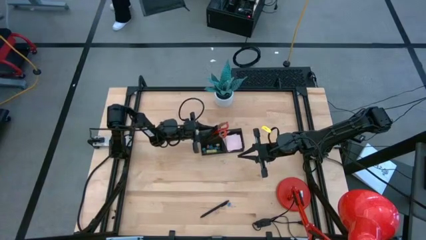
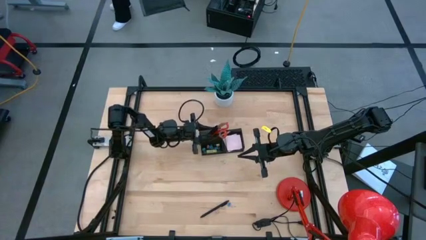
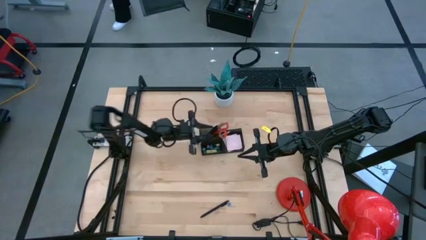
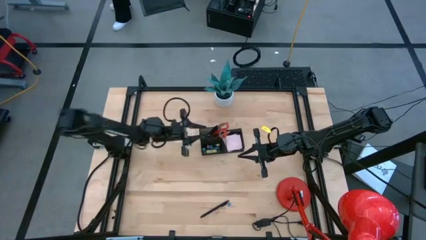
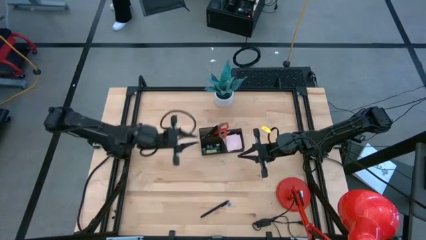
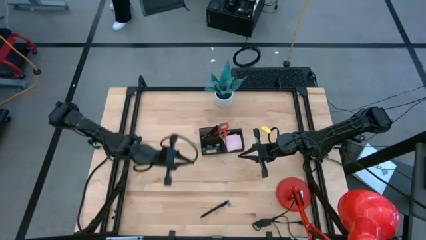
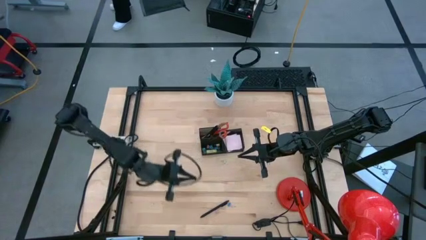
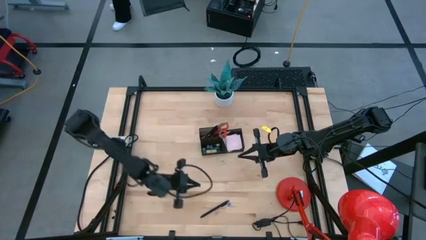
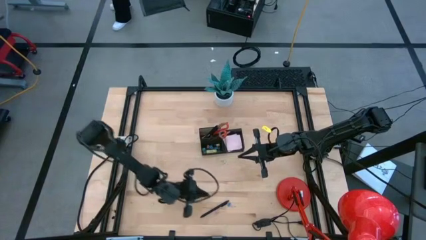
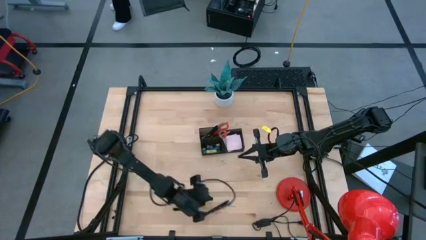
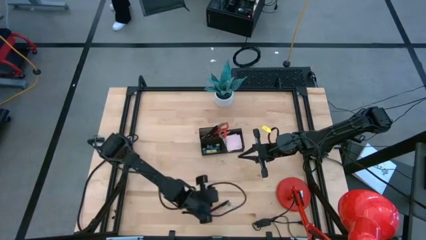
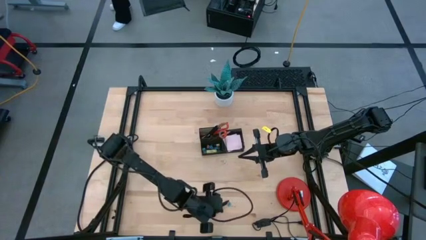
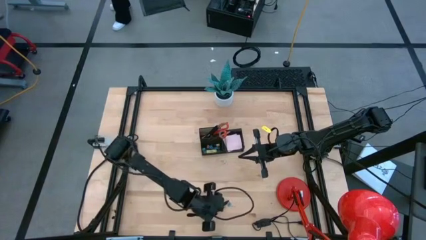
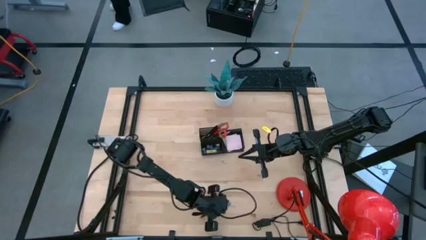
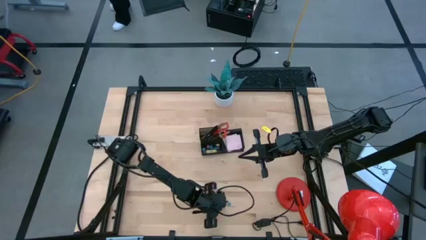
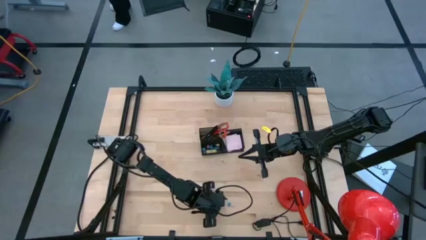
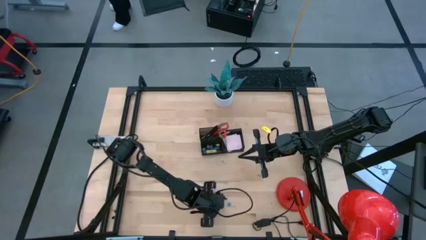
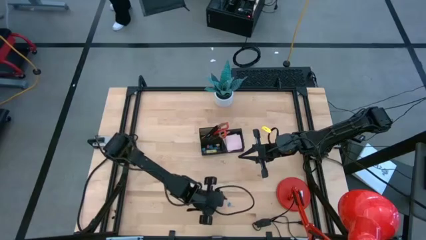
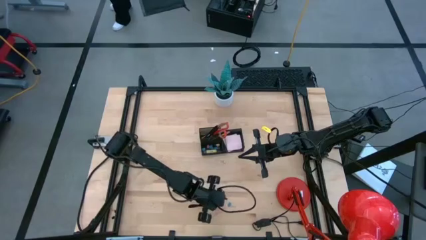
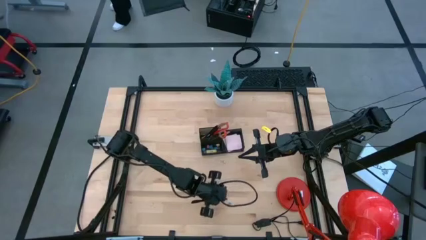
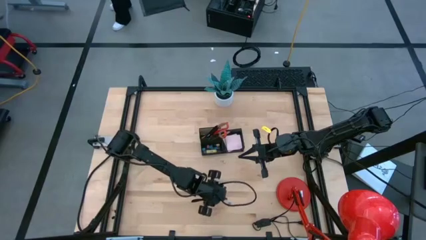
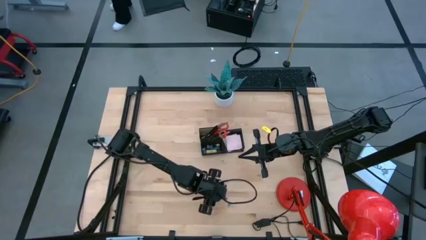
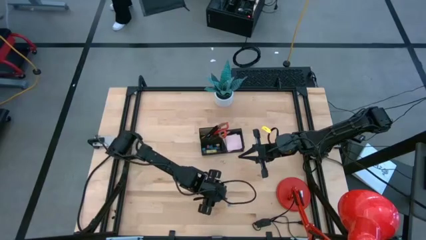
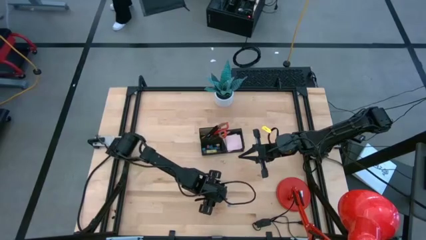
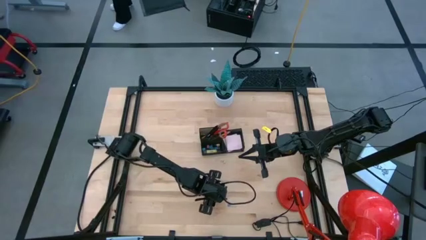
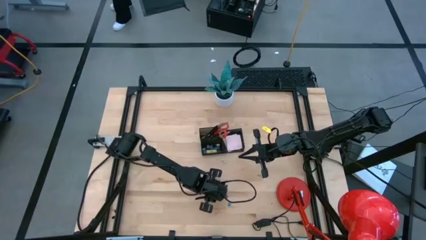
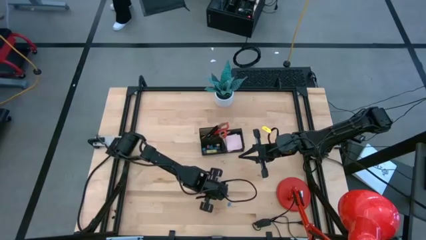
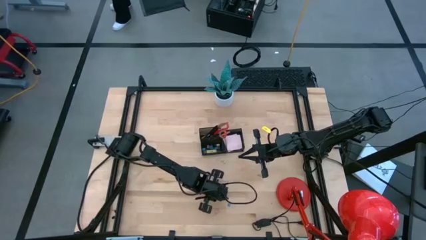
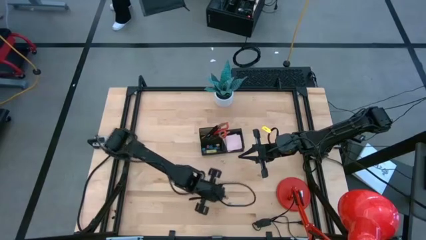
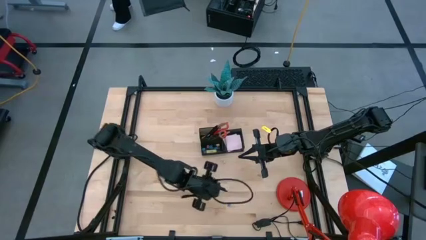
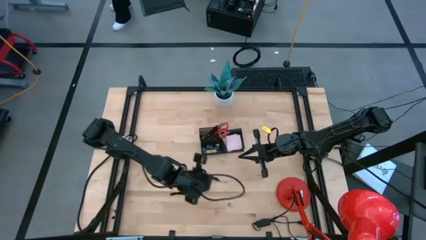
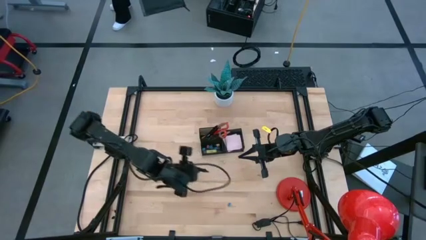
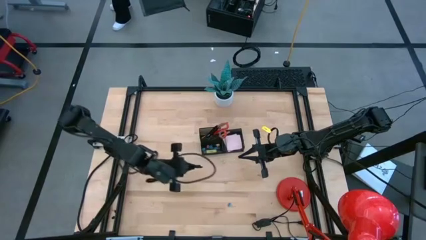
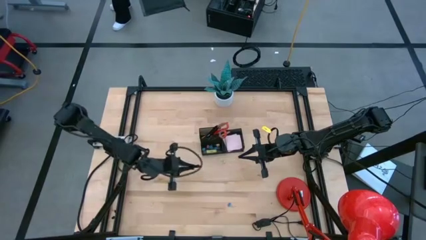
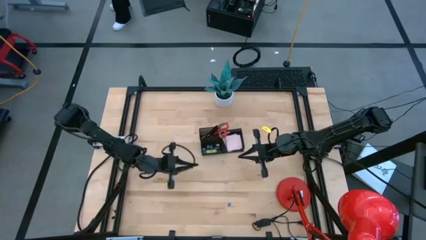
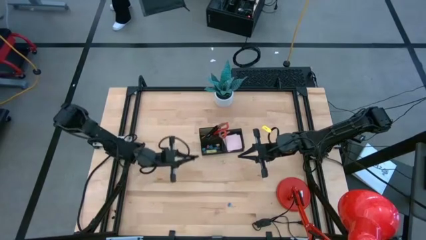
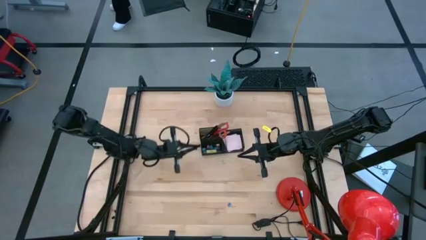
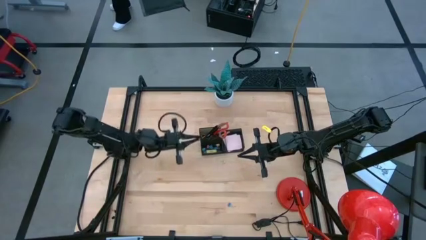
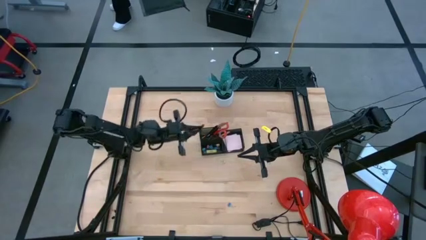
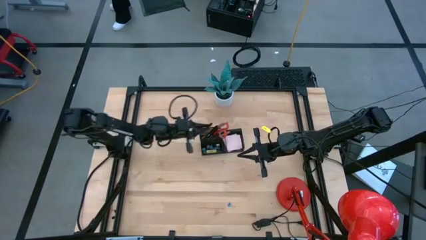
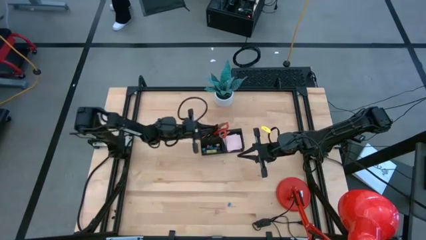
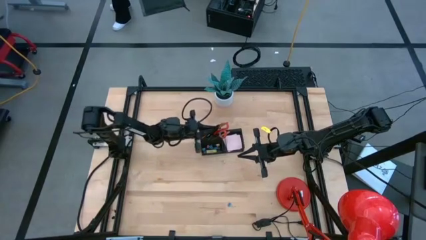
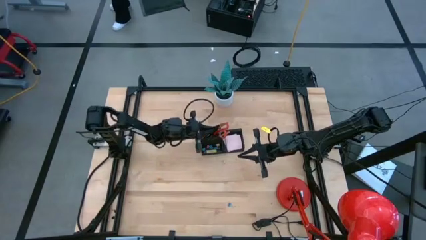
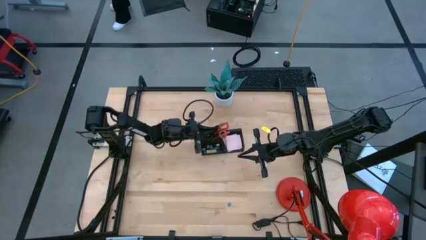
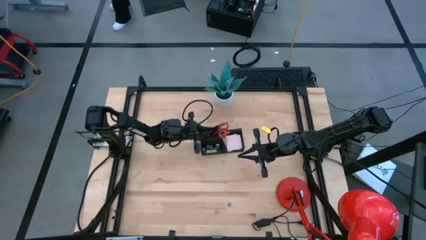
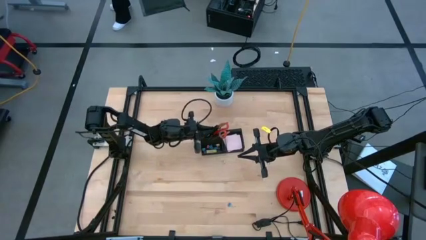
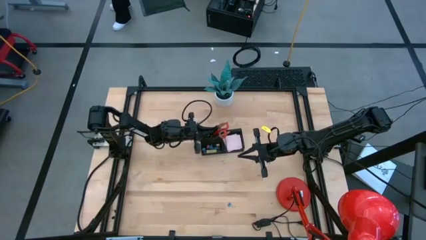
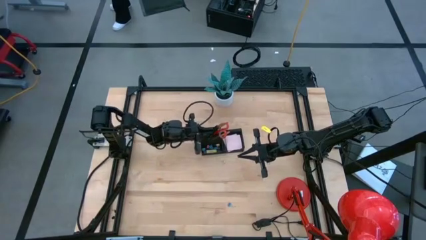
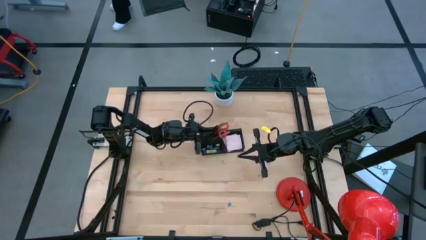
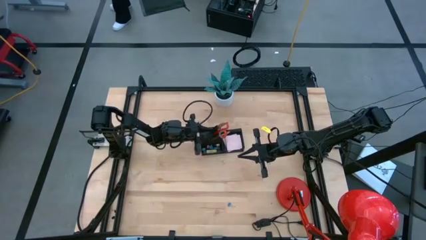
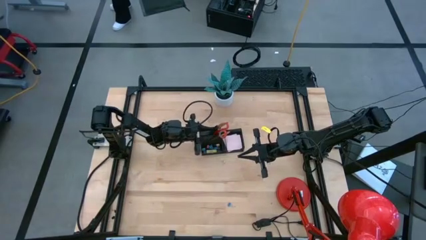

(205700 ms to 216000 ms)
Task: Pick and place office supplies into organizer
Put the black pen into the black desk organizer

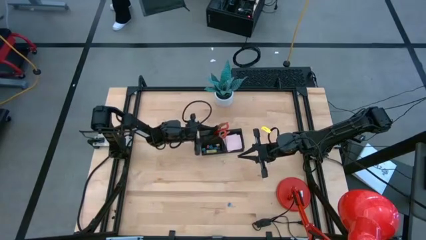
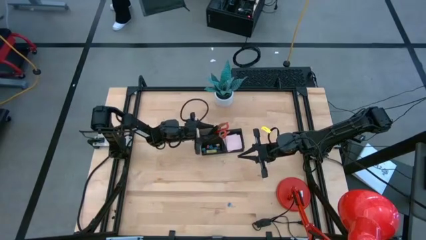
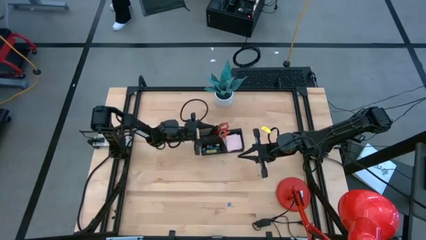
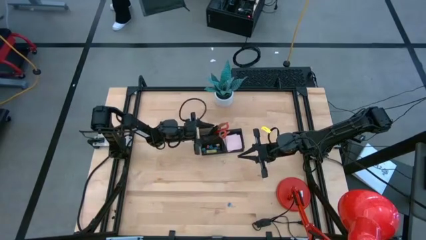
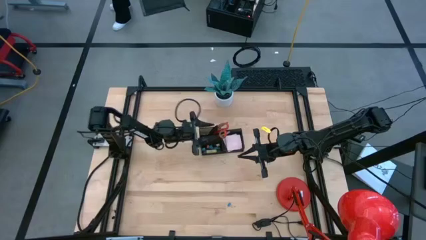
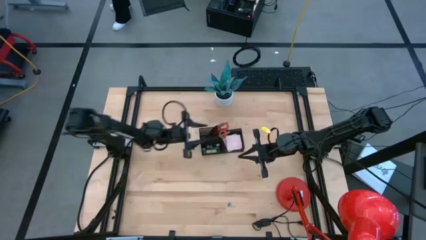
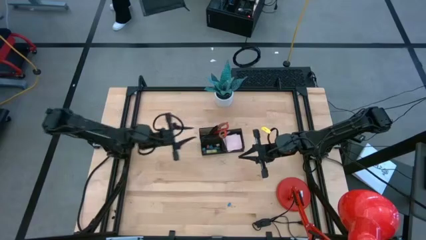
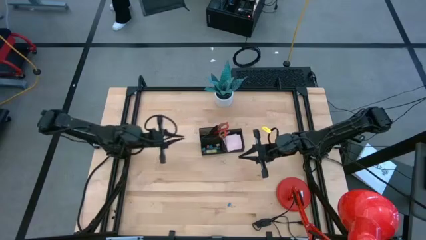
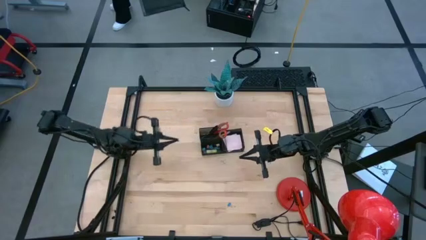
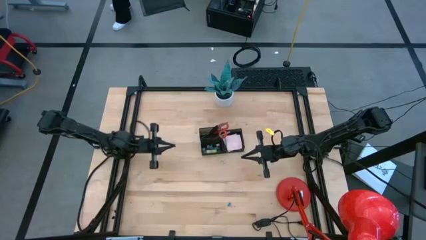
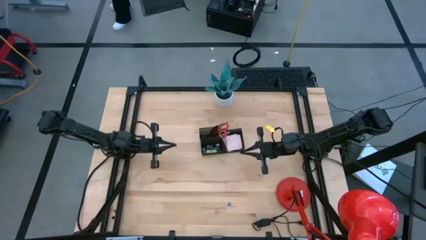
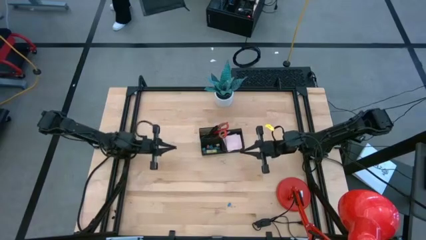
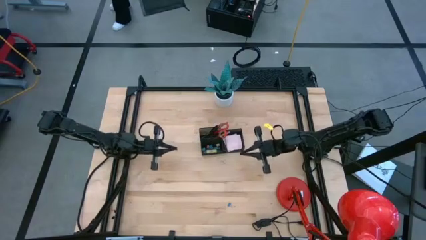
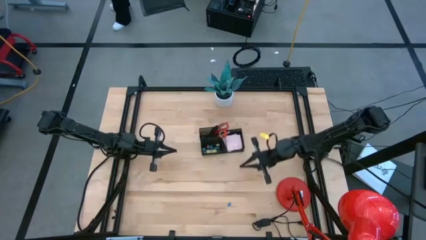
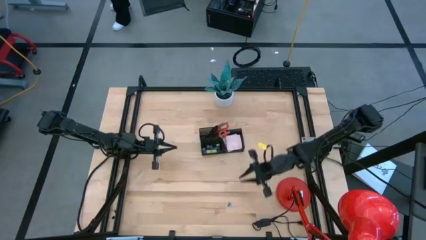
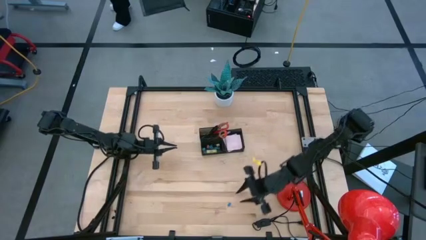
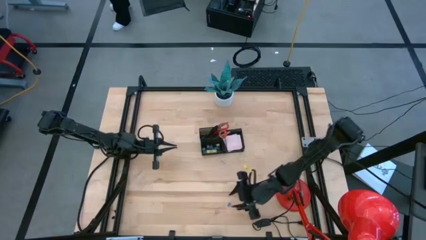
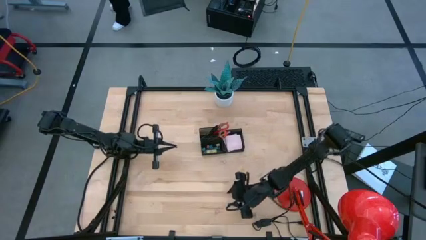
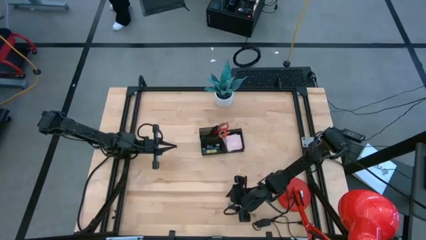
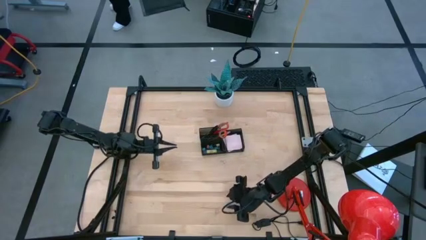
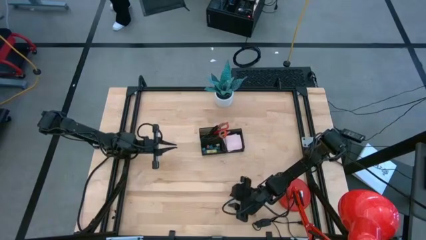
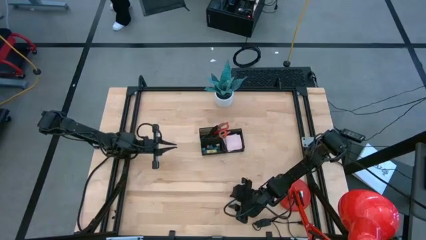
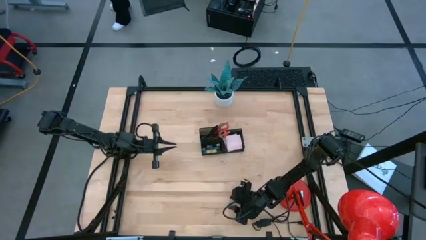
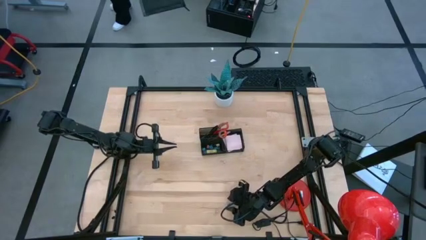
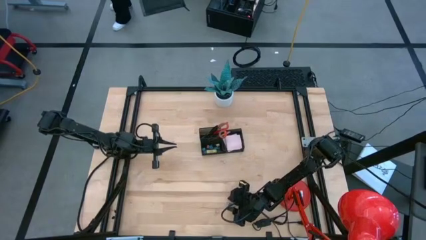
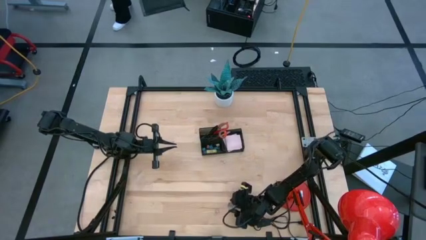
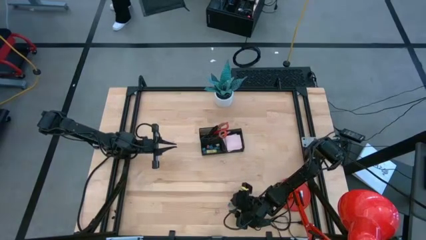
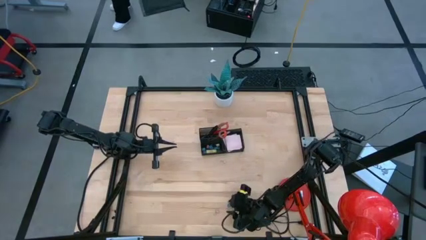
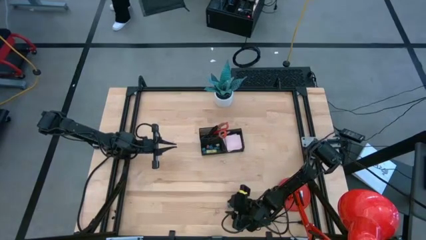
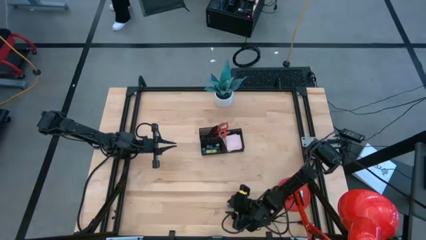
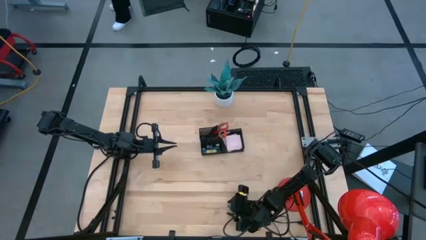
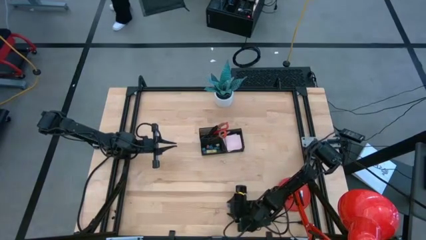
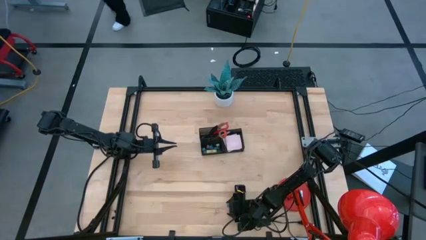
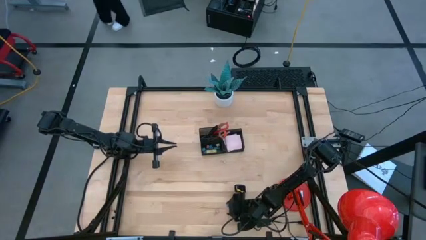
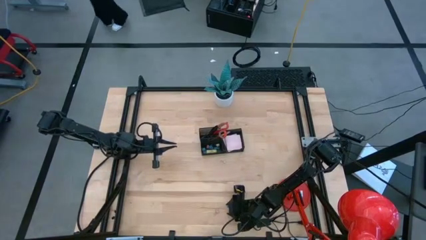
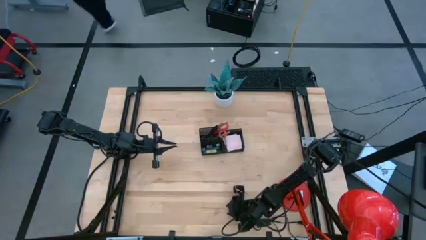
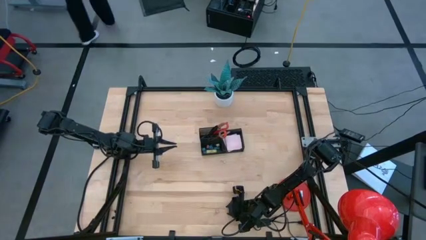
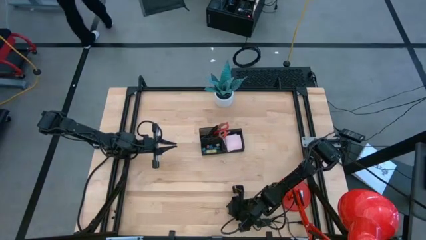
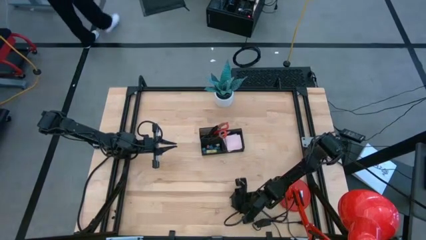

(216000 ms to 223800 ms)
Put the blue binder clip into the black desk organizer
